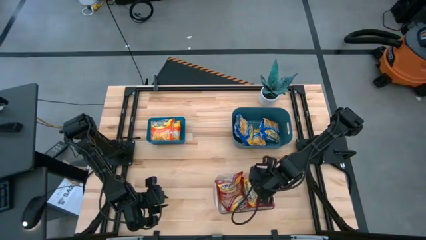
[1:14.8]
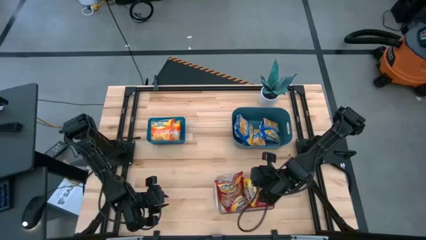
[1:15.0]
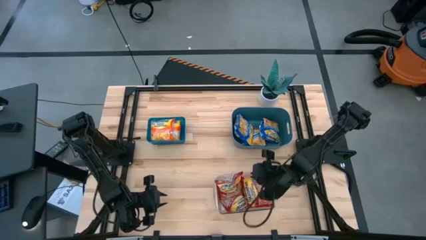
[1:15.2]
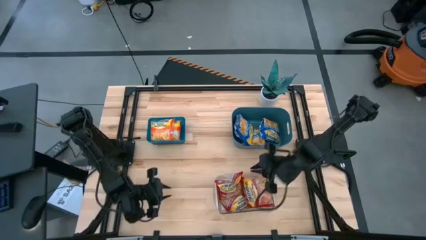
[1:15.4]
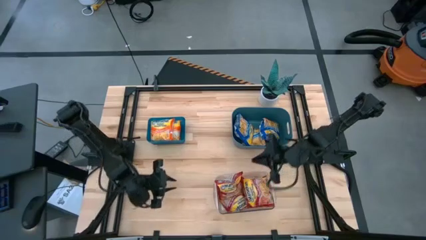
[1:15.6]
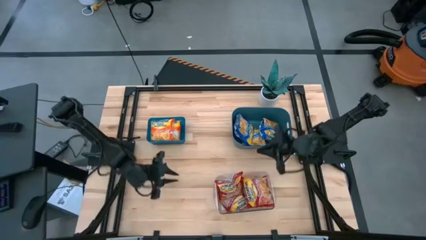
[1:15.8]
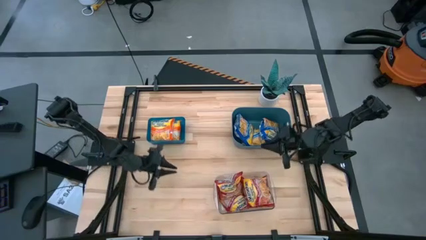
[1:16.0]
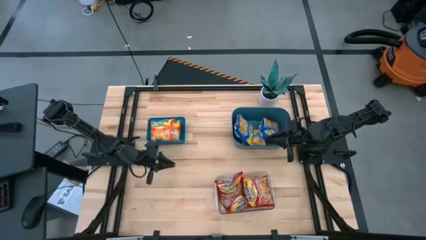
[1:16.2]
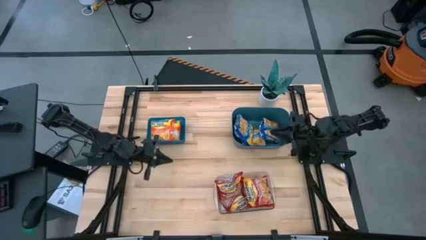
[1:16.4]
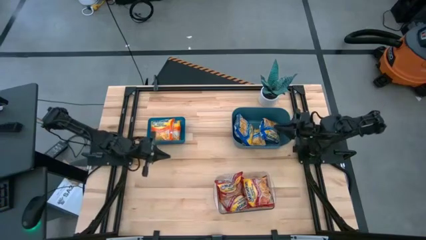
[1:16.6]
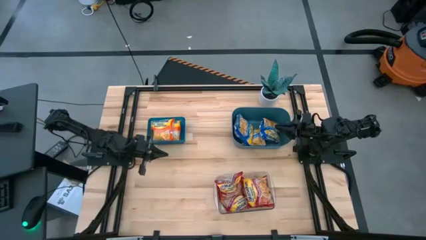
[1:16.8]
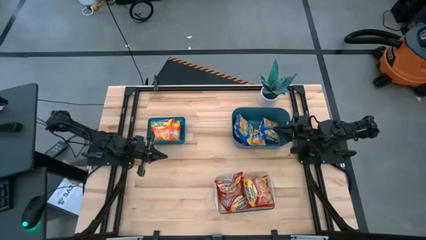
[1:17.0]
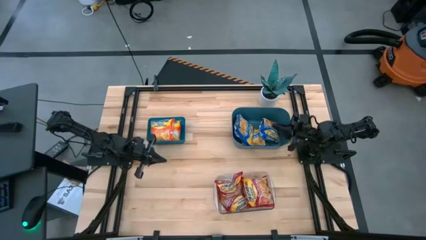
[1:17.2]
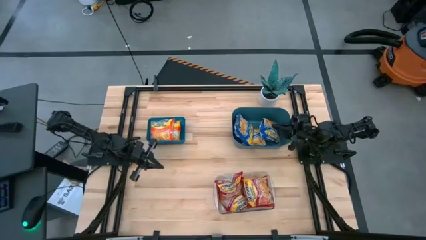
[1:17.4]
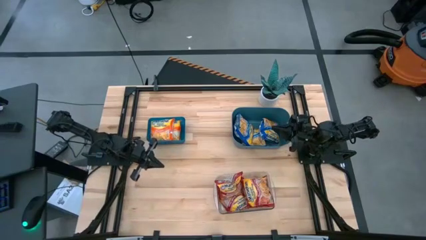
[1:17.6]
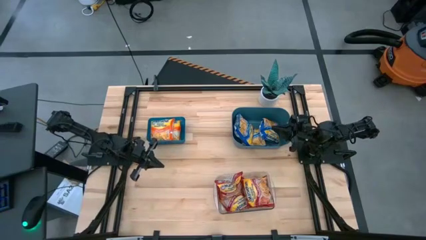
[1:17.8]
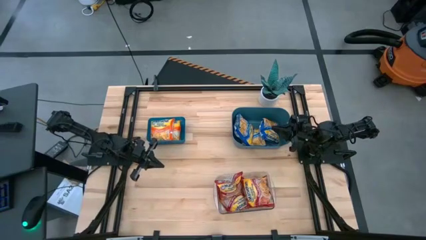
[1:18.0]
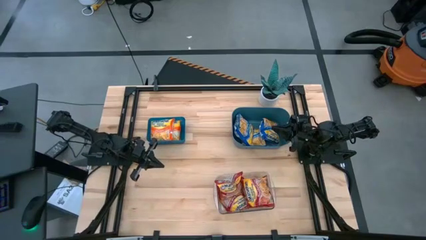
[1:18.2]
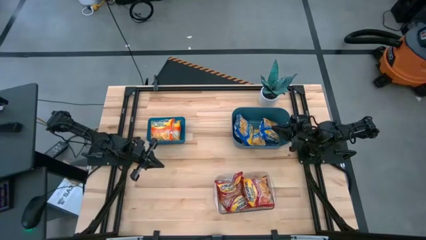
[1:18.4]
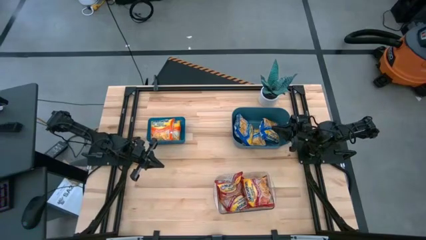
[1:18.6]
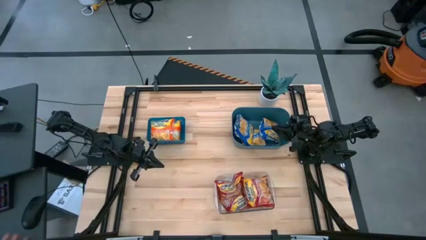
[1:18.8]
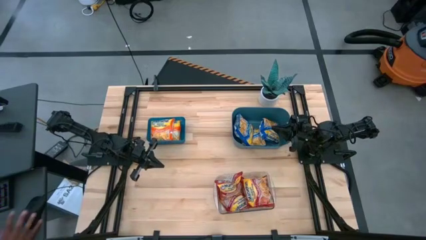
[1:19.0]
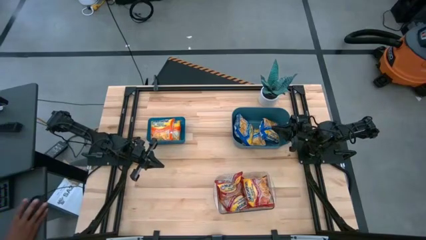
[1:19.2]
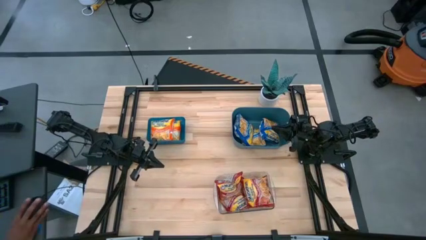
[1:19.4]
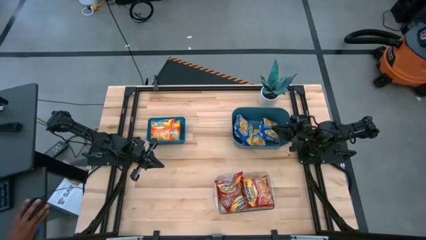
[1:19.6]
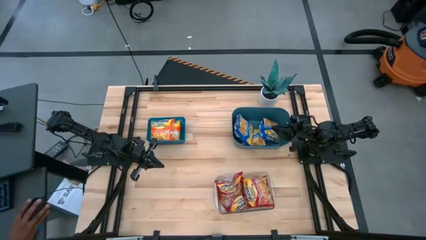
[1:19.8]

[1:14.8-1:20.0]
Task: Sort Maruchan noodles
Return to Home Position

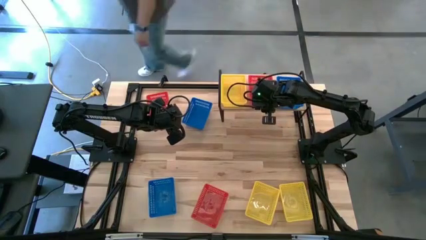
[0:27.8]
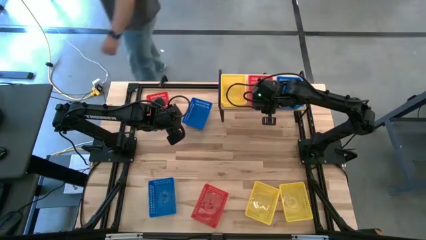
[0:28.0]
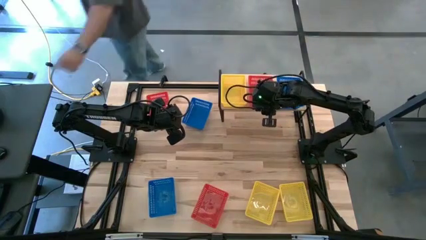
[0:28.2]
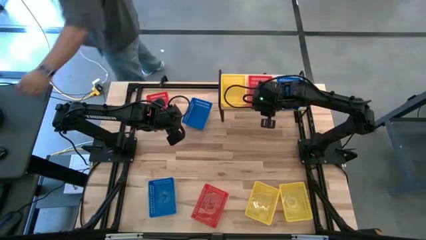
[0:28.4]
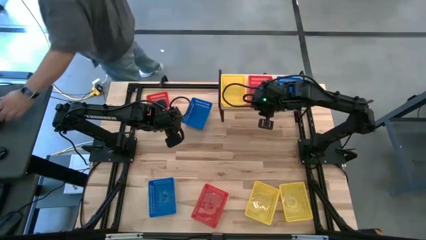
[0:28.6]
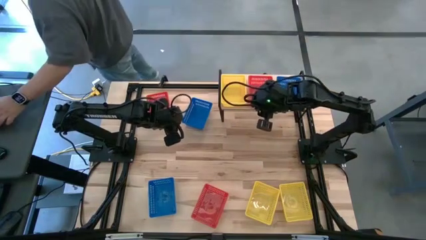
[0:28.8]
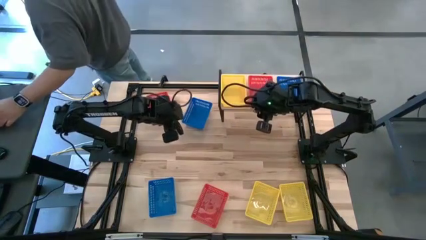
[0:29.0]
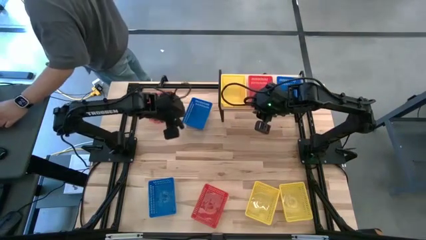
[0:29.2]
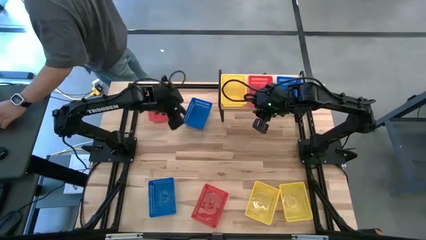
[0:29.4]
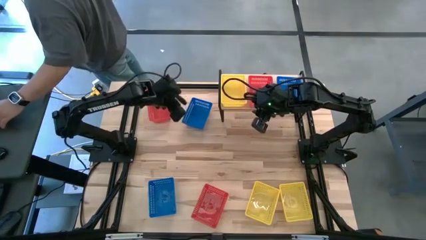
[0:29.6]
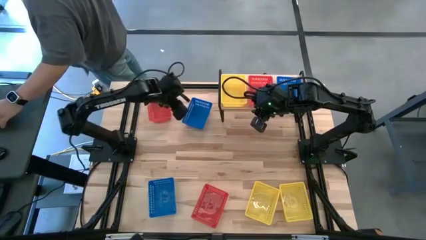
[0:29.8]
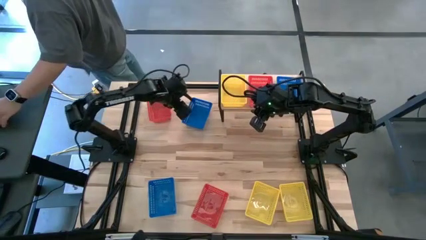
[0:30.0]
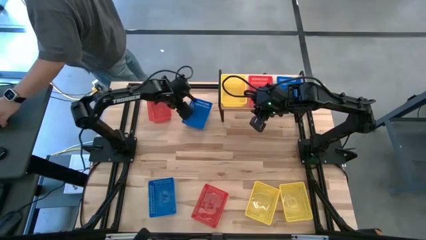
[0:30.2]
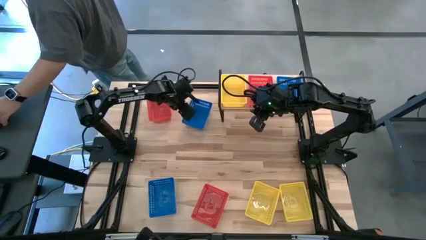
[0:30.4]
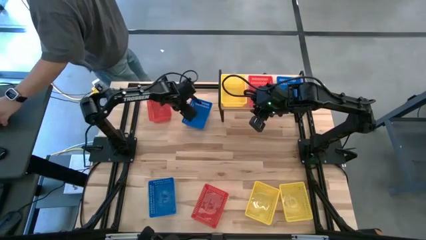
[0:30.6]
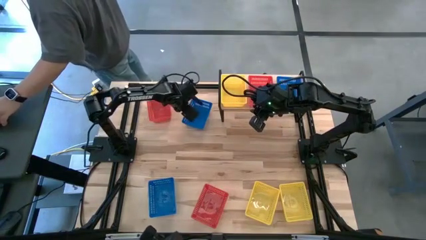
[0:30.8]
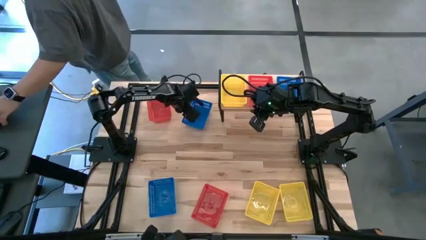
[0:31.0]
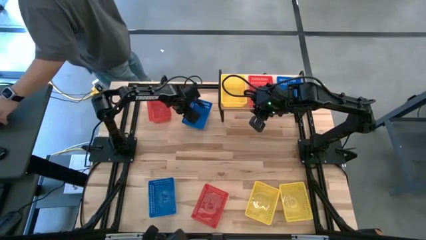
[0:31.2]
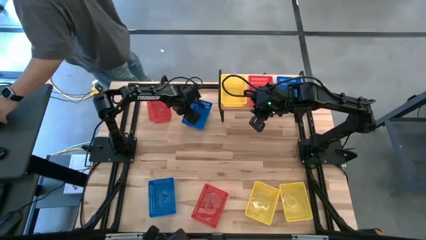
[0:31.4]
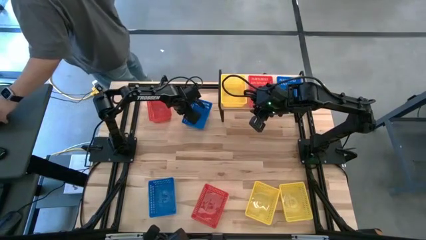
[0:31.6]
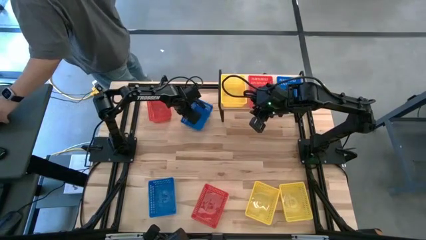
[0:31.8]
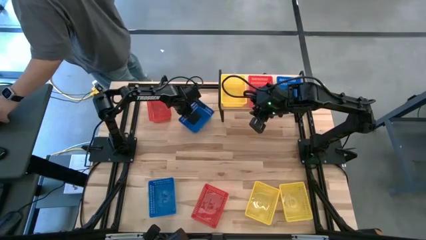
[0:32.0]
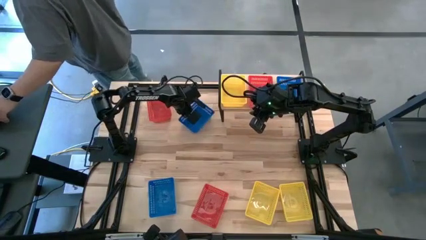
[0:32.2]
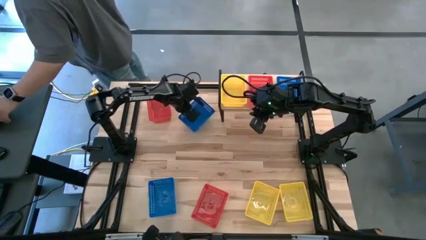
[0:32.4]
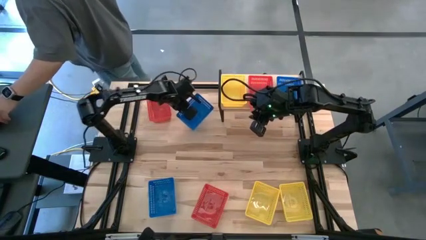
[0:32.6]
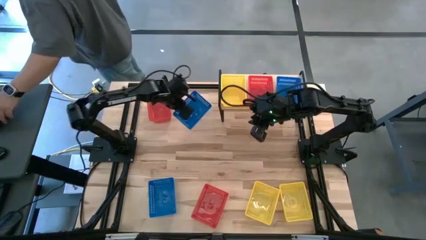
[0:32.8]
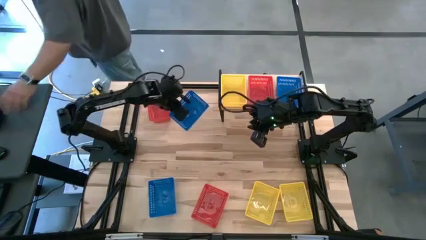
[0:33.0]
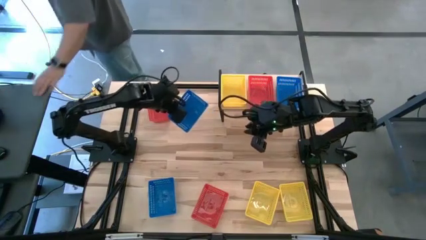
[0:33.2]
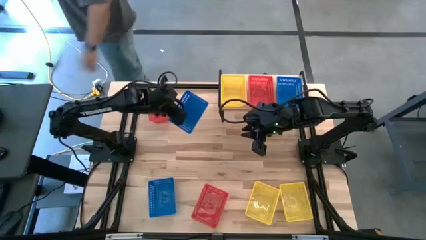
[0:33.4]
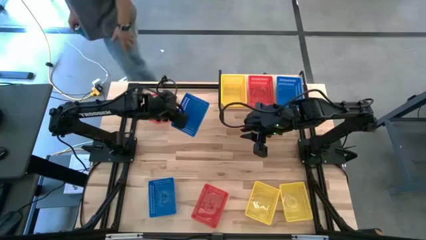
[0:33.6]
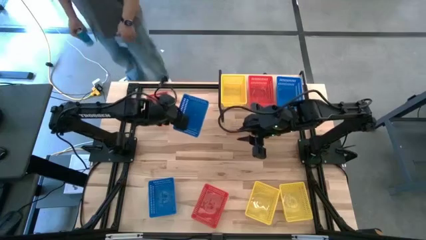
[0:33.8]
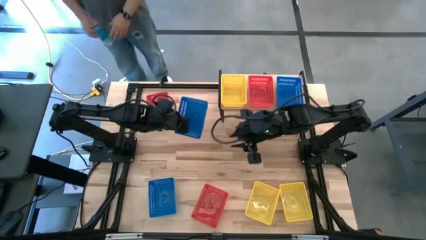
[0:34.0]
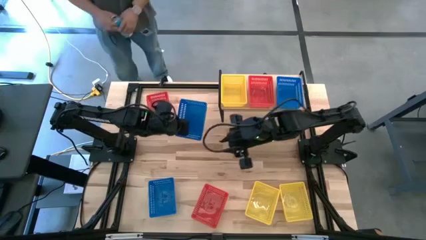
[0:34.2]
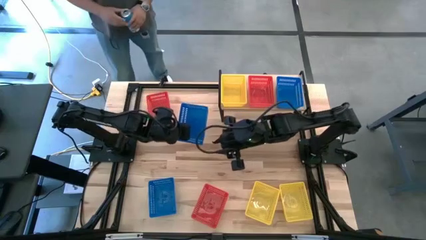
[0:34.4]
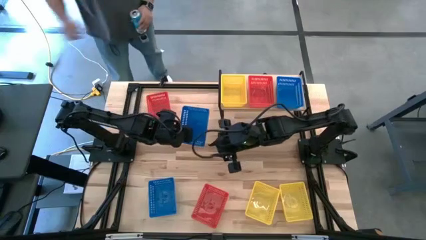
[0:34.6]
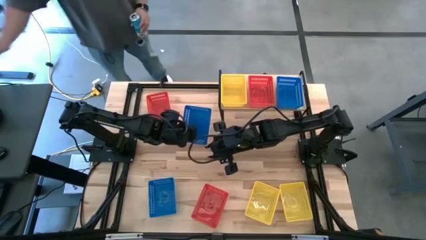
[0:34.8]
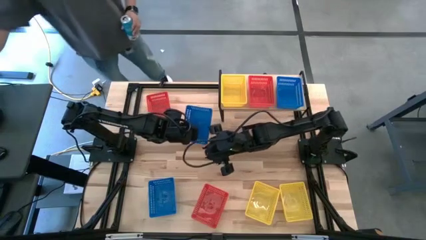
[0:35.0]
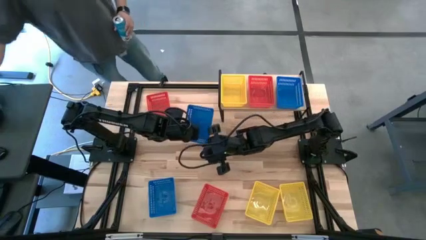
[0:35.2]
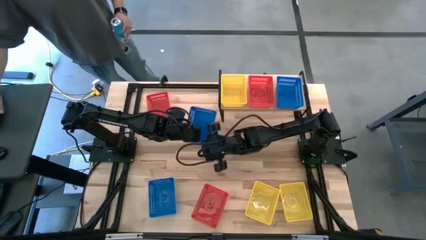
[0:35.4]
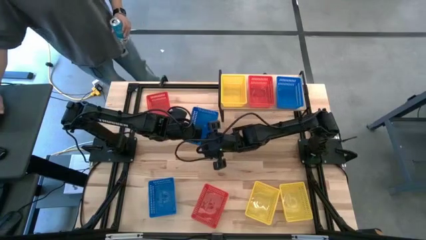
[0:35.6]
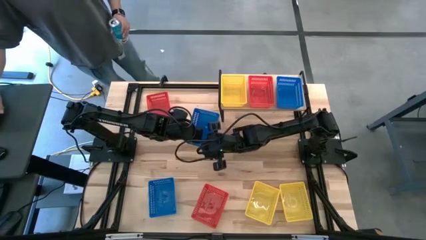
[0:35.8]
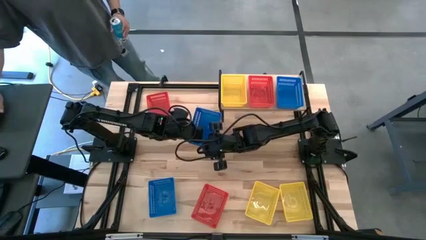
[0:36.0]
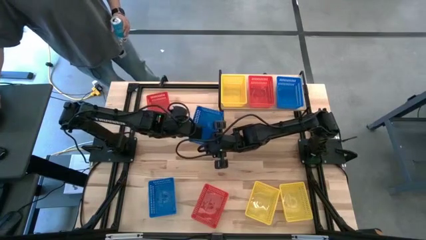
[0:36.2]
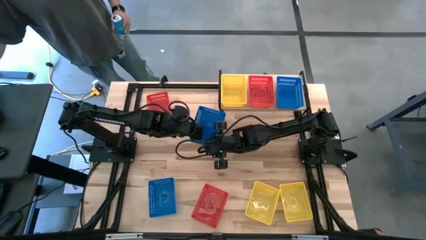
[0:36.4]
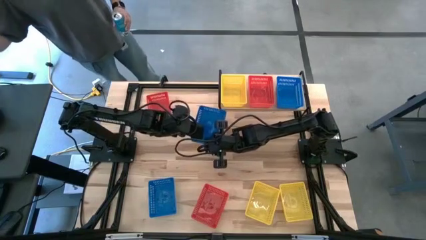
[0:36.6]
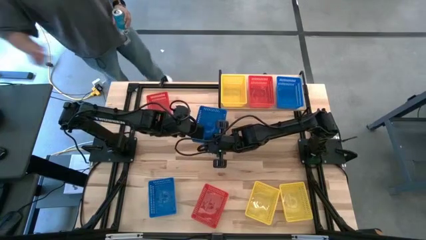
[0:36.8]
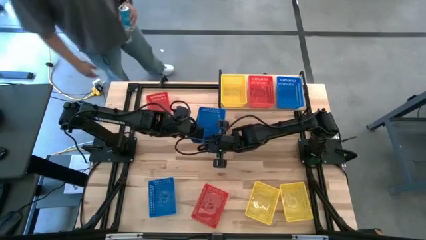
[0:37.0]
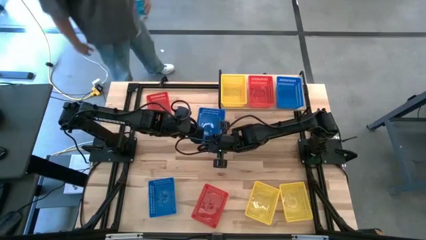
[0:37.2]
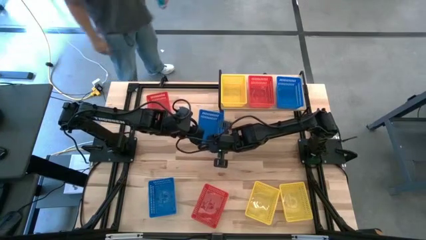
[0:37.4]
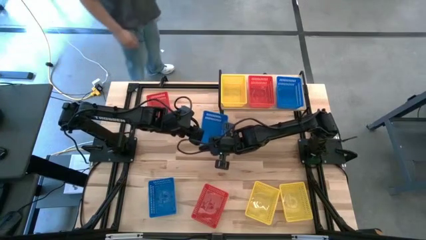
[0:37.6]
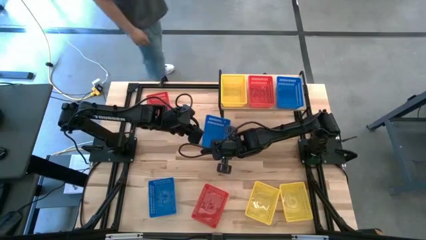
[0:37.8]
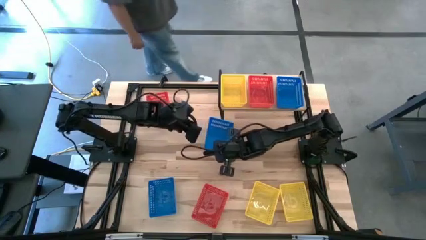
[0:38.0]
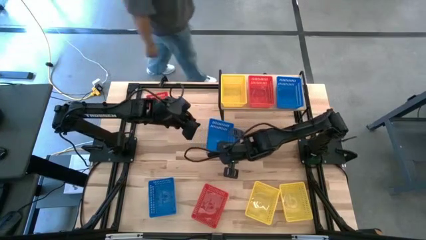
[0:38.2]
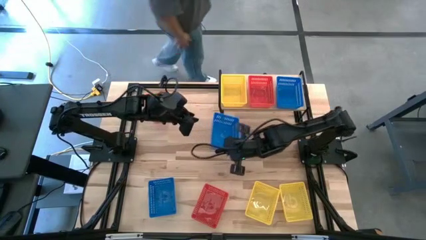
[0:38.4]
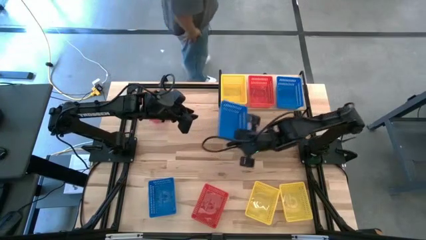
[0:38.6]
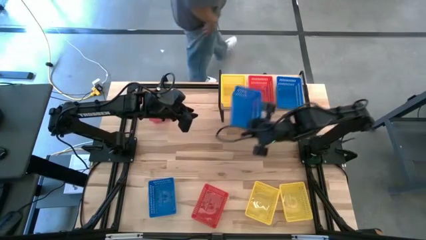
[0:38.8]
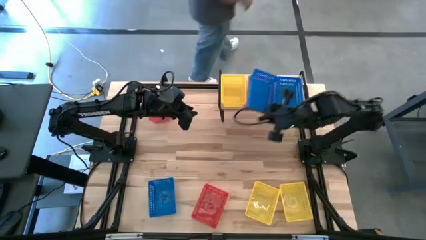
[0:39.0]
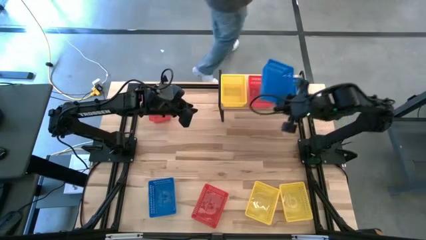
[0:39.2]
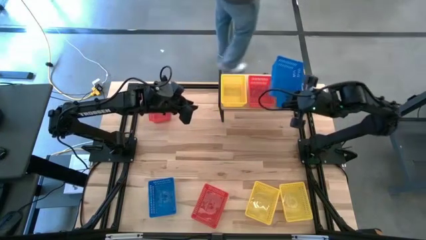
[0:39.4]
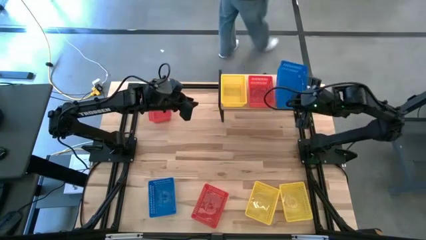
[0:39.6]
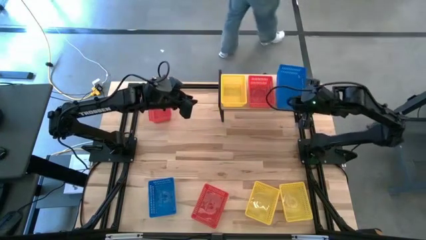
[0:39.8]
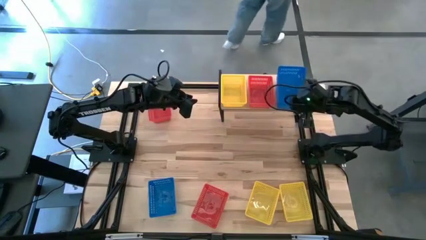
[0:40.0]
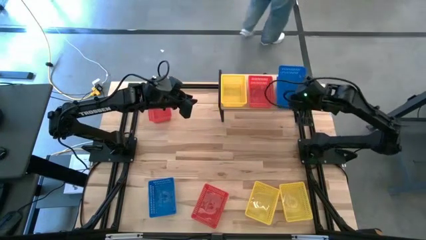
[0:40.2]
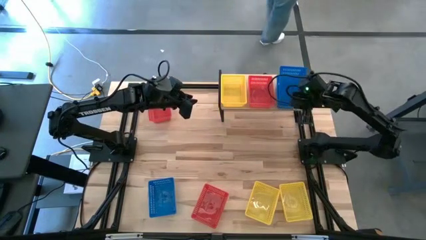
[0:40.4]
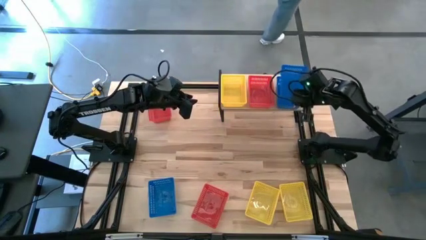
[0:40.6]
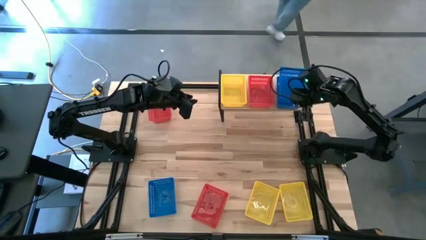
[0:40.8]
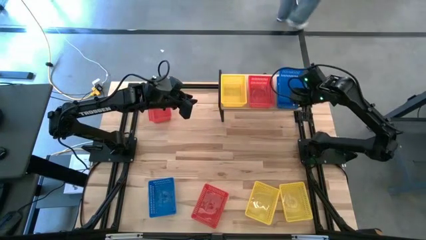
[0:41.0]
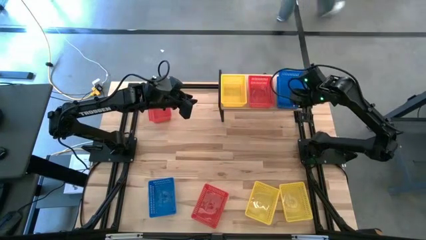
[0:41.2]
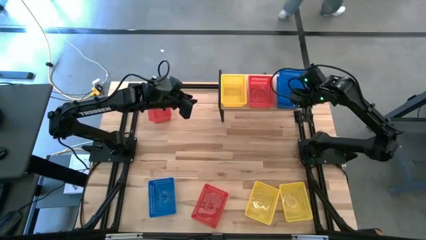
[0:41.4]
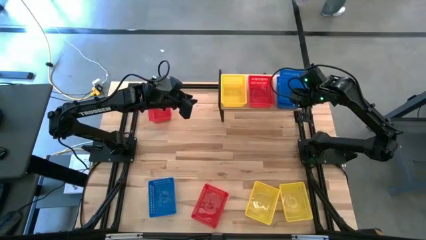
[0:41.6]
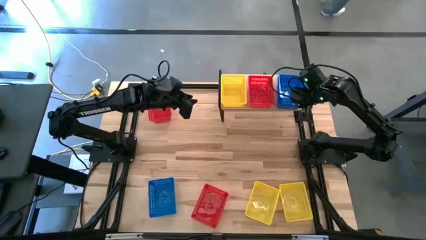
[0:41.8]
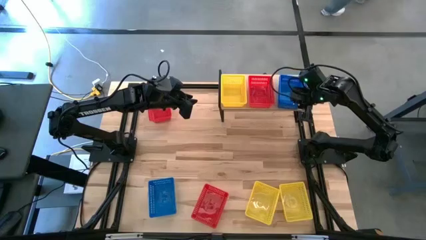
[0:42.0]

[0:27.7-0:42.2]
Task: Stack baskets on shelf by color
Stack the top blue basket on the blue basket on the shelf
